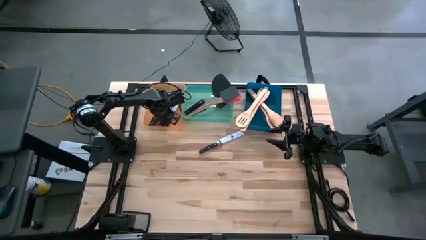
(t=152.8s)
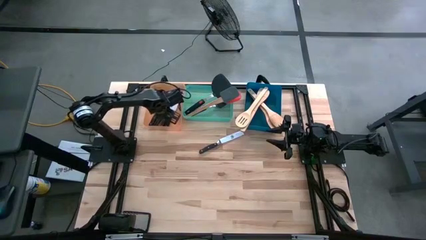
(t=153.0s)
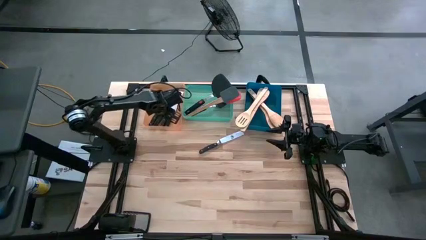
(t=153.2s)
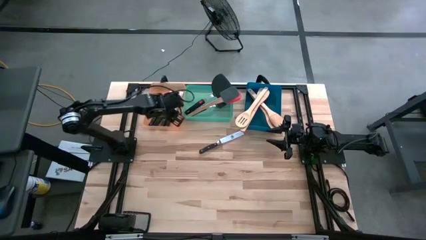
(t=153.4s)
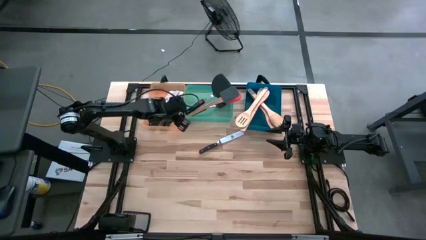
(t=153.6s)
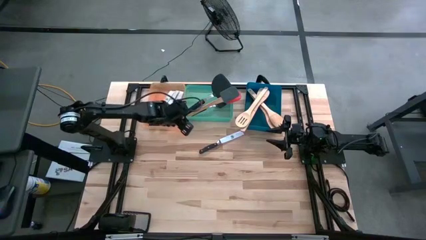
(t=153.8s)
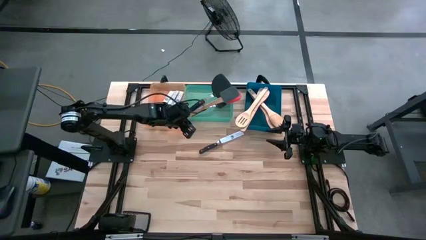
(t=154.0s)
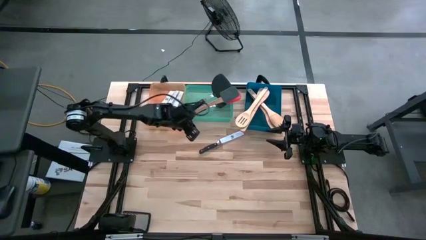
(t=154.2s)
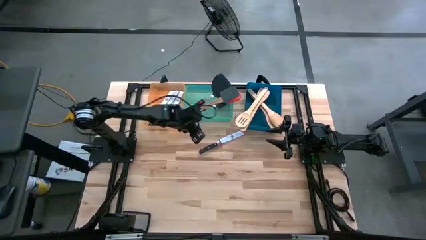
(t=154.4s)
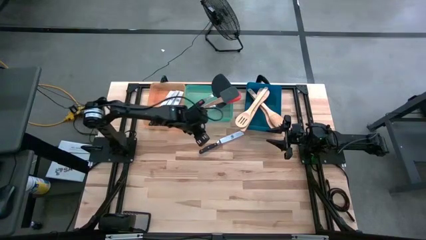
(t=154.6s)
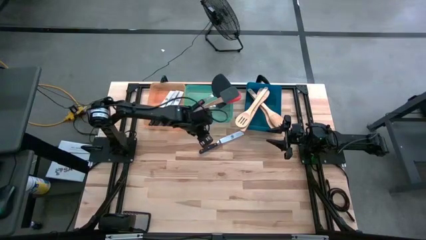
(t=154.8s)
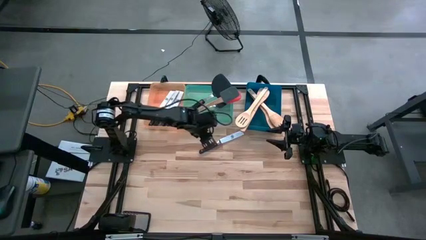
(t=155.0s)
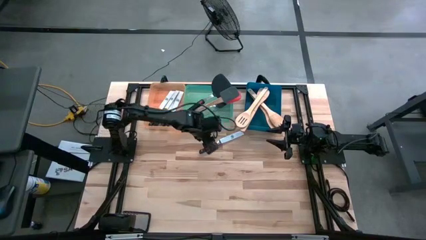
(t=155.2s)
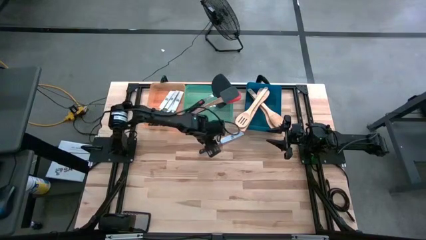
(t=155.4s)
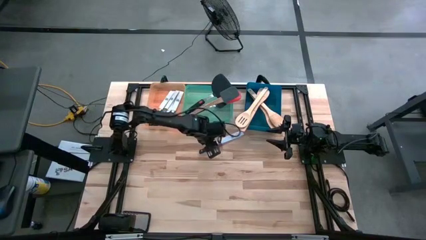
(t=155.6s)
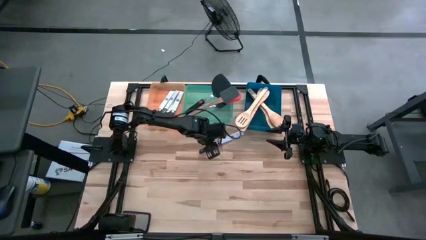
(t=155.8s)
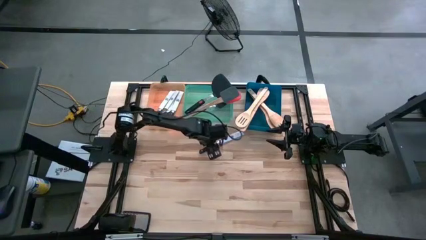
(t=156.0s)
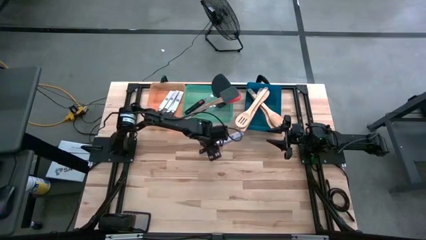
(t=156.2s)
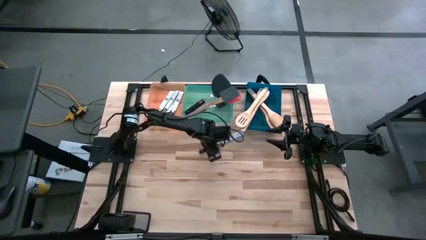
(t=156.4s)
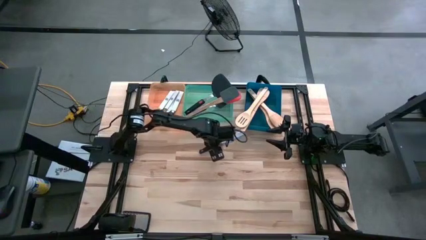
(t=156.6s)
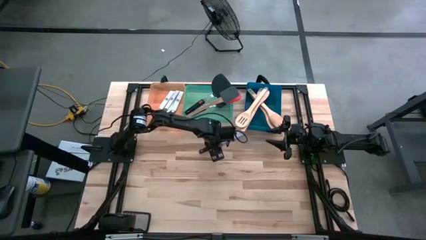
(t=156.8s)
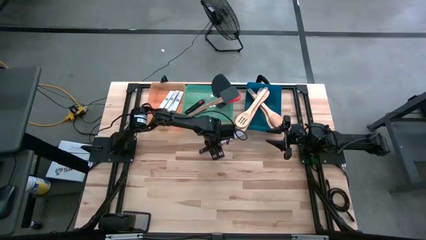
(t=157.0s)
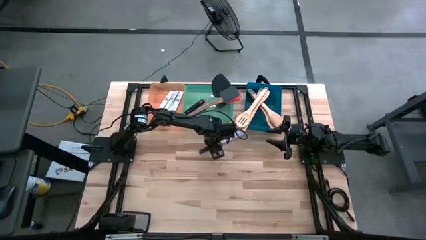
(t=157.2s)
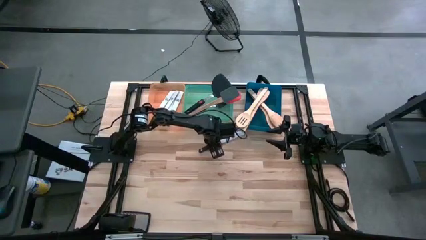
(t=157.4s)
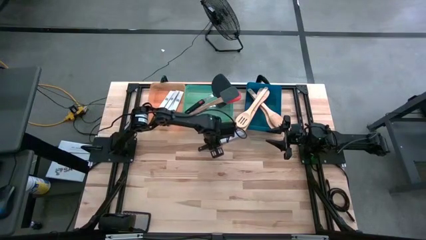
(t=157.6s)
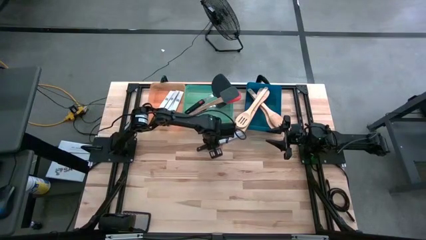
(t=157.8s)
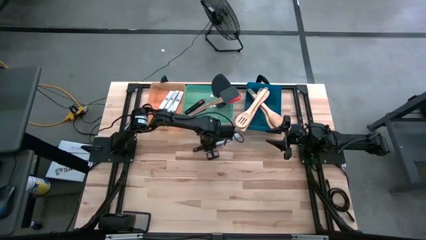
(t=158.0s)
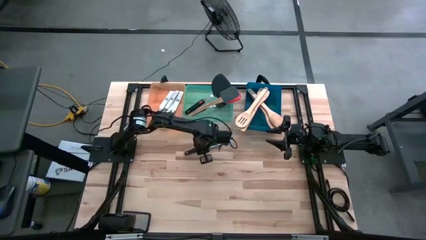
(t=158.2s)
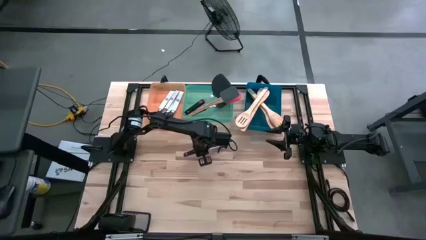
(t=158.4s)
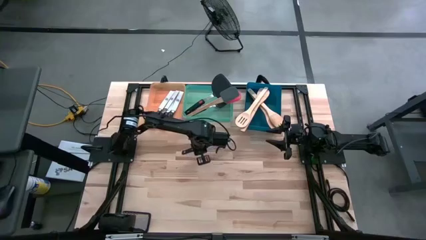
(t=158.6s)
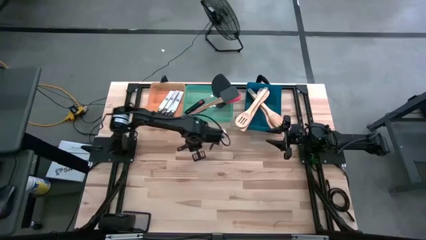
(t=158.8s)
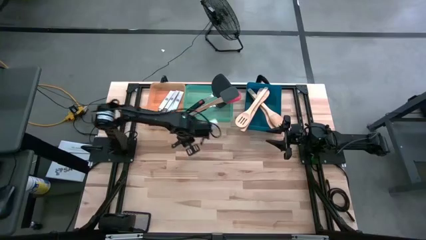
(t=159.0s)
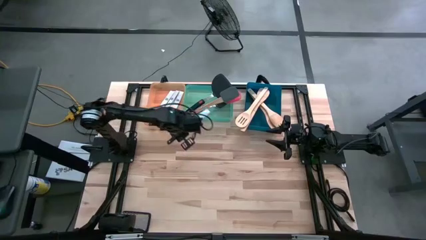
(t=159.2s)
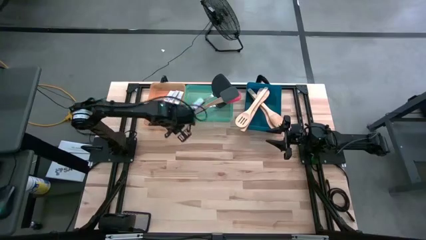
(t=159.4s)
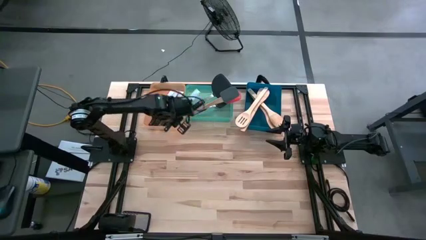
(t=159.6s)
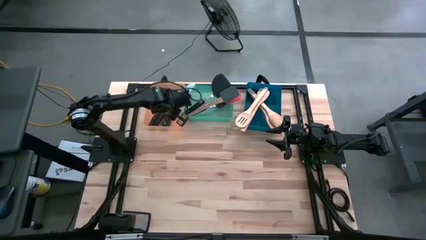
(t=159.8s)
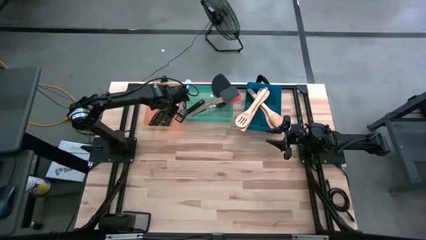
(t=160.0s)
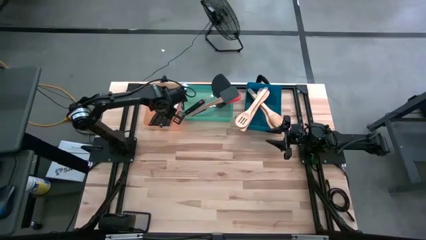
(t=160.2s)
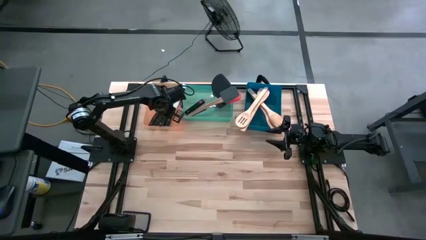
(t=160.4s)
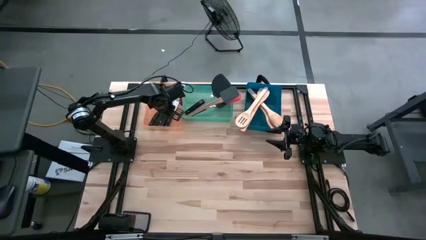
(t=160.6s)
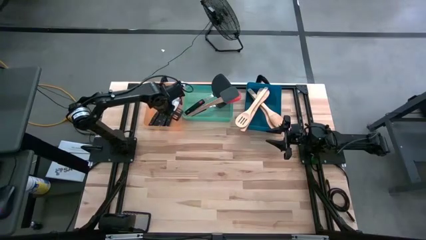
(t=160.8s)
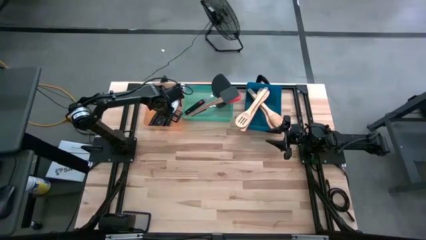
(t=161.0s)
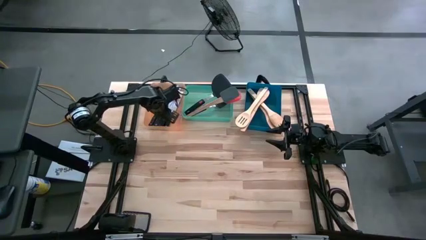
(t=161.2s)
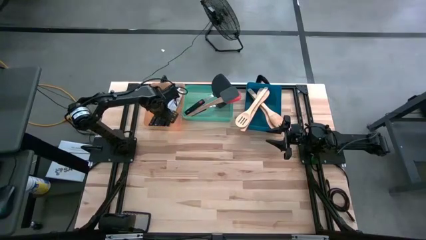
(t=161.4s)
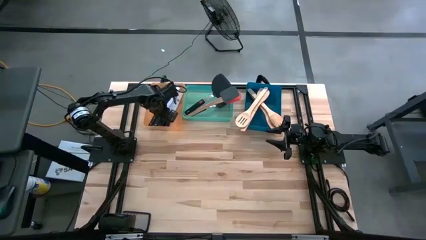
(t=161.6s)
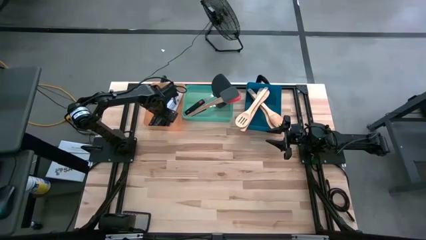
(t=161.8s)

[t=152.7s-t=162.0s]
Task: Pick & Place Kitchen Items
Put the black knife into the orange bin

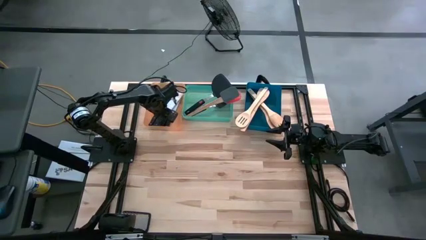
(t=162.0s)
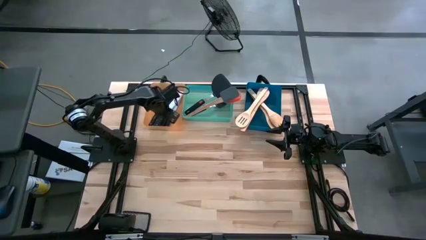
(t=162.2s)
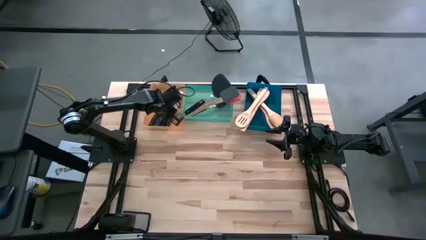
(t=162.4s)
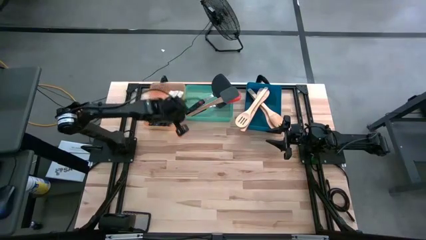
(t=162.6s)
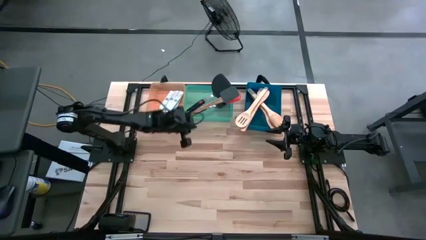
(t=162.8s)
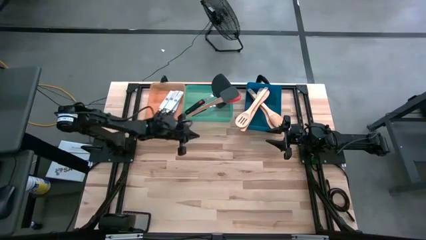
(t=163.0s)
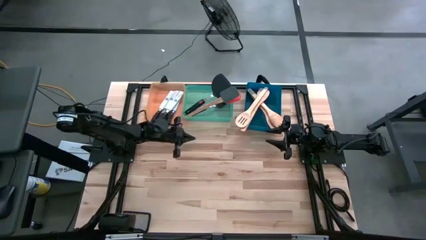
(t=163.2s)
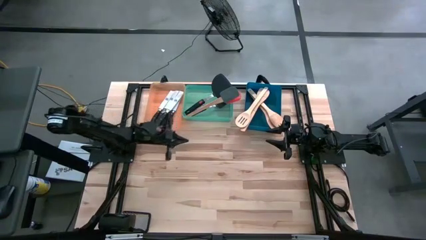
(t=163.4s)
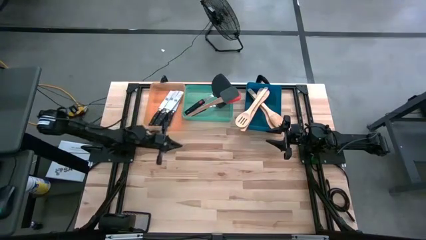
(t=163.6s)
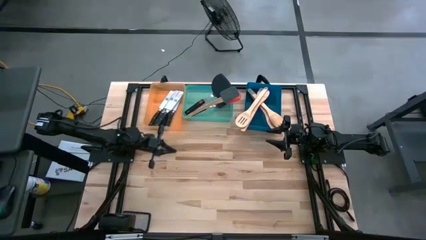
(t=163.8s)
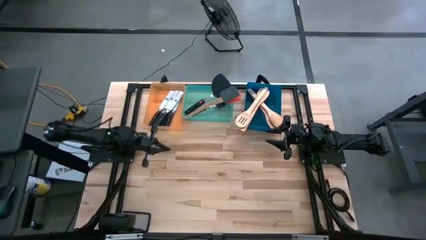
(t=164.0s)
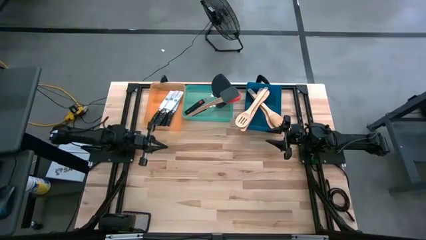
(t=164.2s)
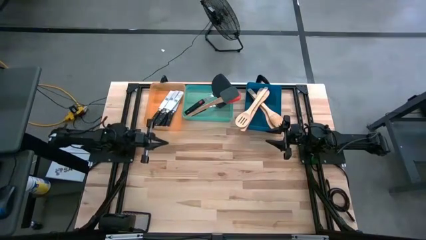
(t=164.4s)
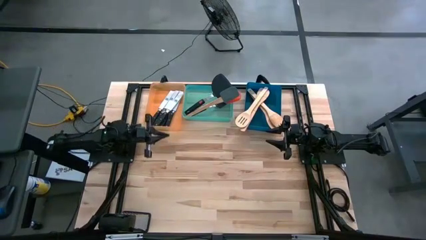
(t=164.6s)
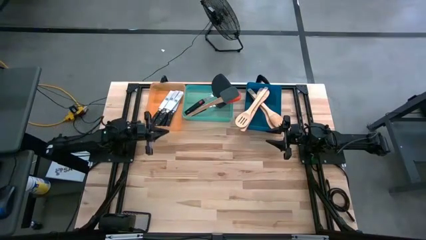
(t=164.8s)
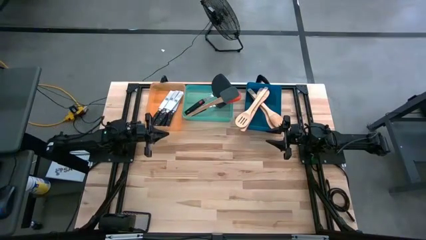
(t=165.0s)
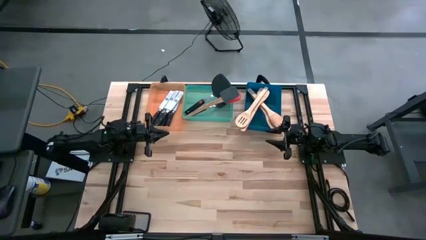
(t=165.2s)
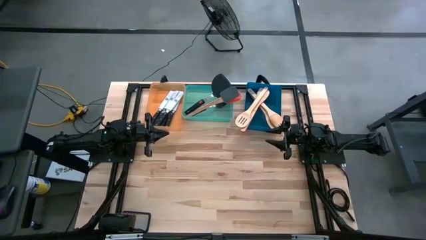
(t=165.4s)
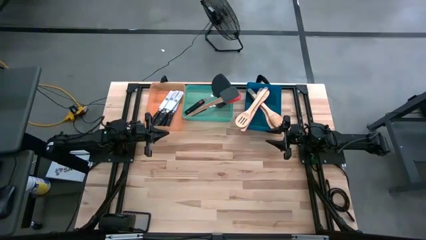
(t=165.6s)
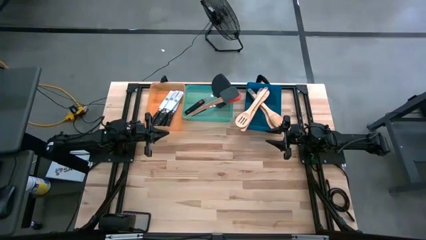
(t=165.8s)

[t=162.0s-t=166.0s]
Return to Home Position

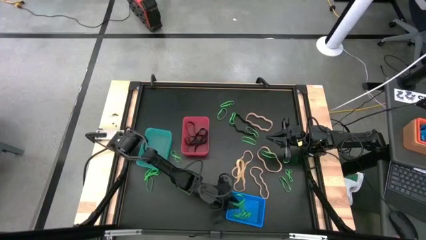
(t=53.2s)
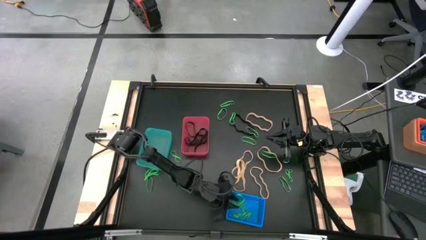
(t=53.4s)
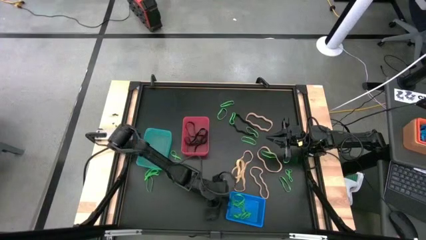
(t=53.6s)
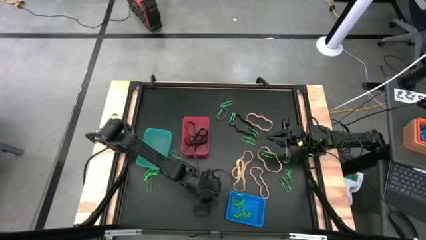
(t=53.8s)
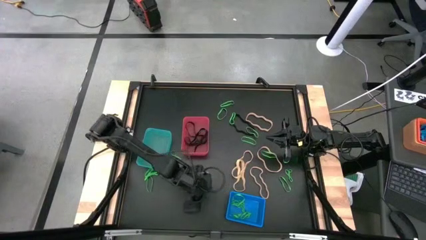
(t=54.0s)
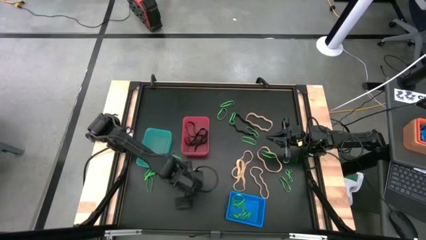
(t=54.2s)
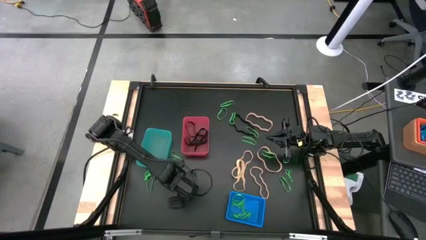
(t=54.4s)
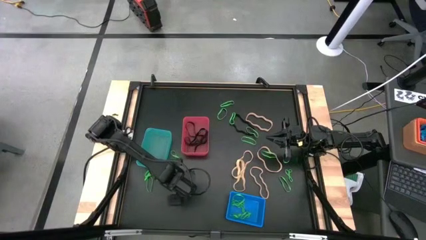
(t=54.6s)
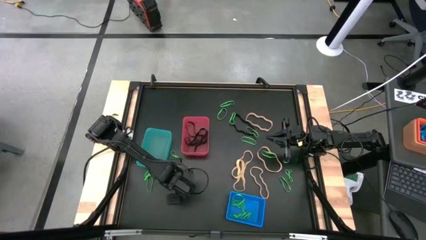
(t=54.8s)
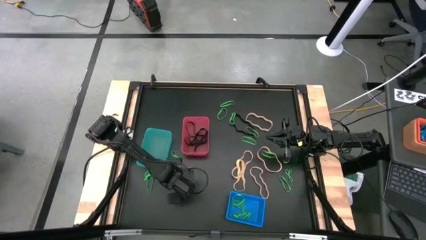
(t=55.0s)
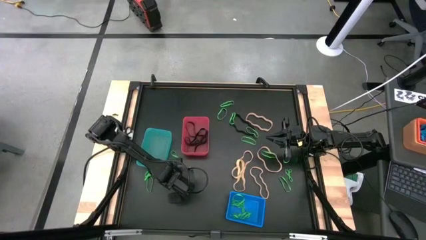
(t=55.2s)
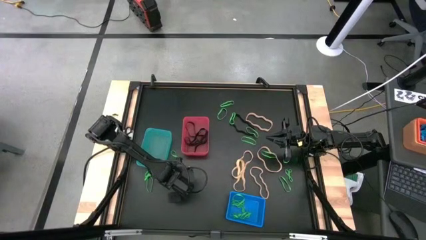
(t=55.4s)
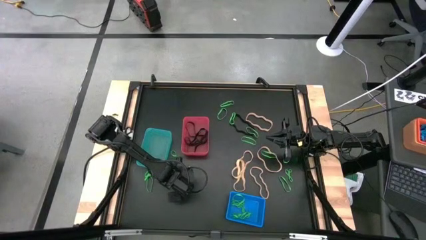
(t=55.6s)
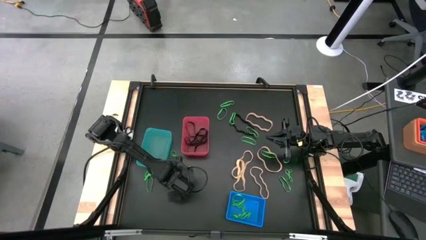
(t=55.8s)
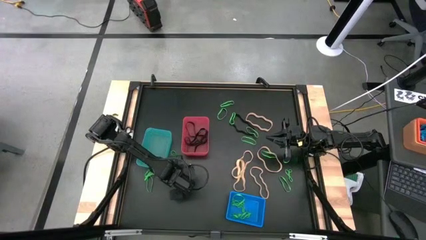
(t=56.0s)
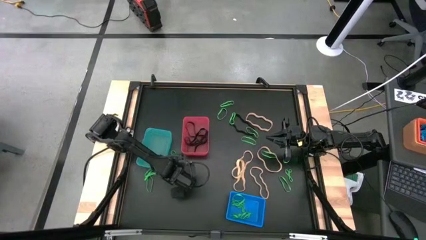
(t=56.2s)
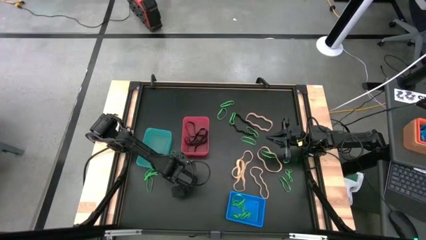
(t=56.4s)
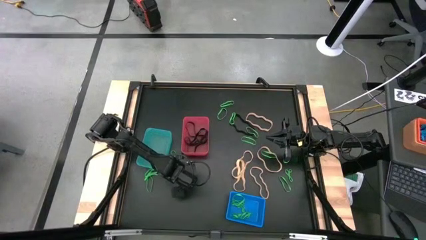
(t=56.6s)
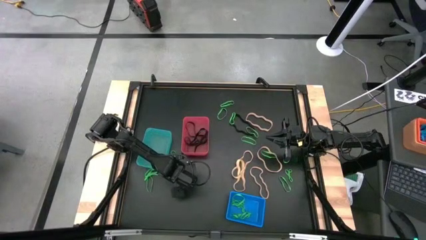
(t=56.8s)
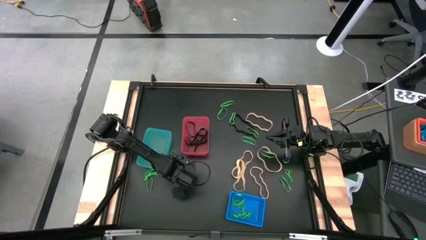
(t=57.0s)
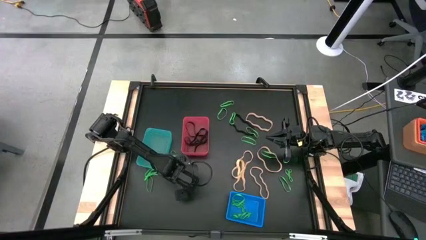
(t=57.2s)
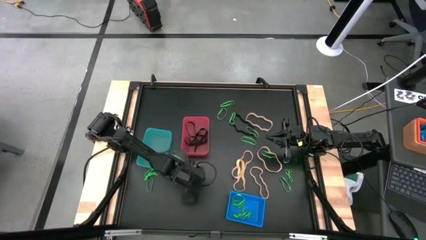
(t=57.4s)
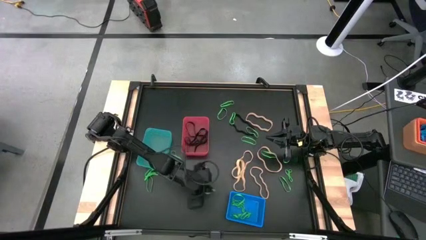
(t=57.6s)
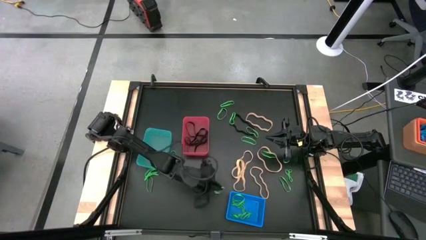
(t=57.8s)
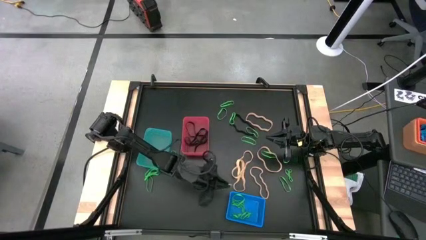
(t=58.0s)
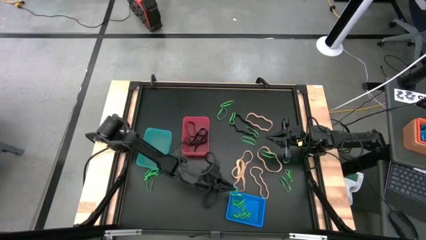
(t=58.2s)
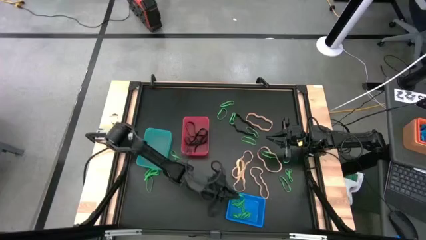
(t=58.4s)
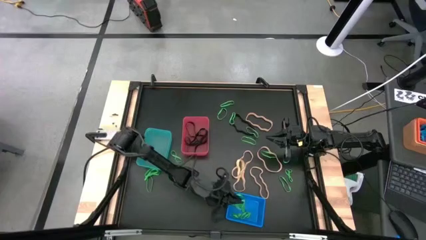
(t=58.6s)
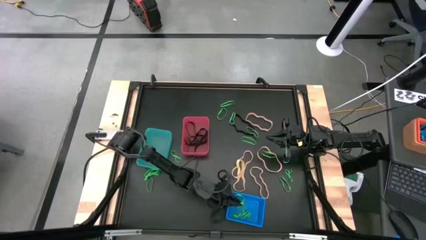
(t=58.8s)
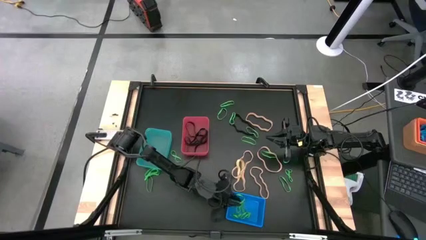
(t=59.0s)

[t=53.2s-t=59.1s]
Task: Sort rubber bands into baskets
Put the green rubber band into the blue bin
